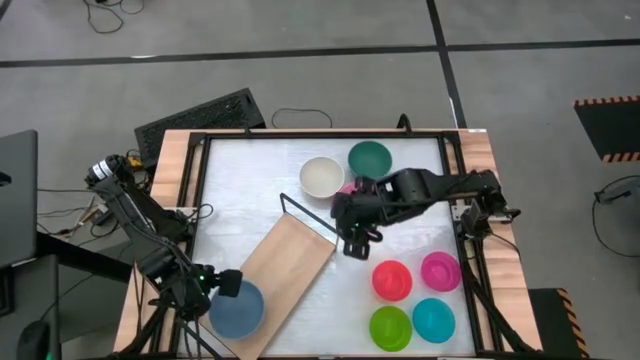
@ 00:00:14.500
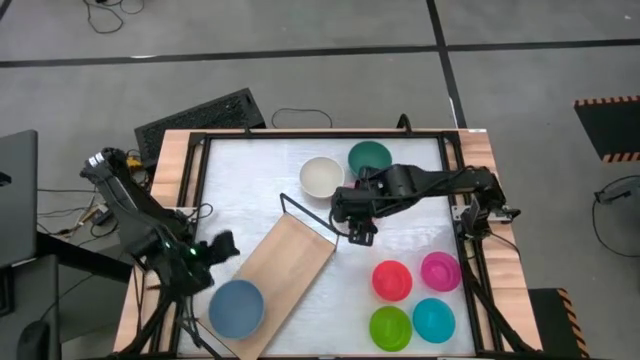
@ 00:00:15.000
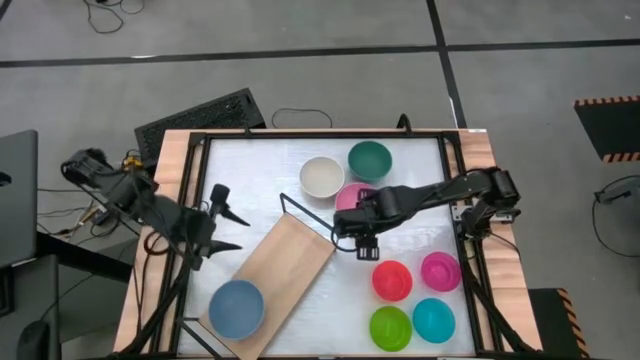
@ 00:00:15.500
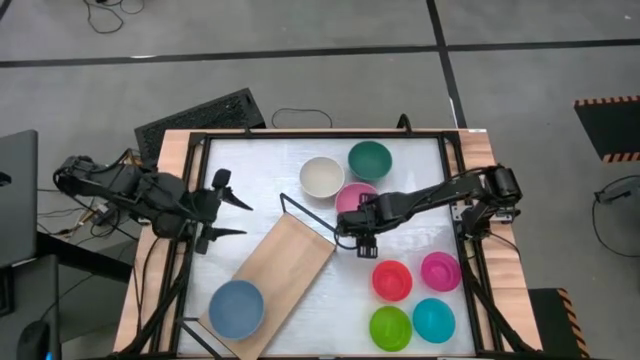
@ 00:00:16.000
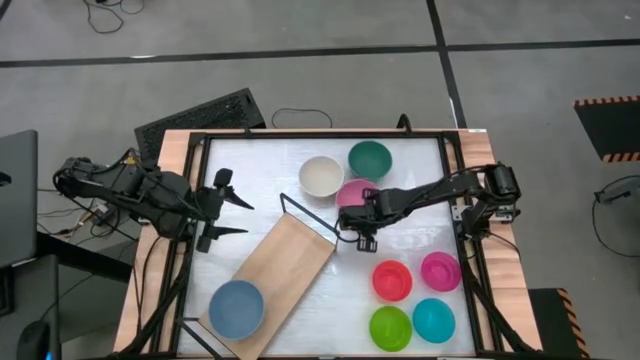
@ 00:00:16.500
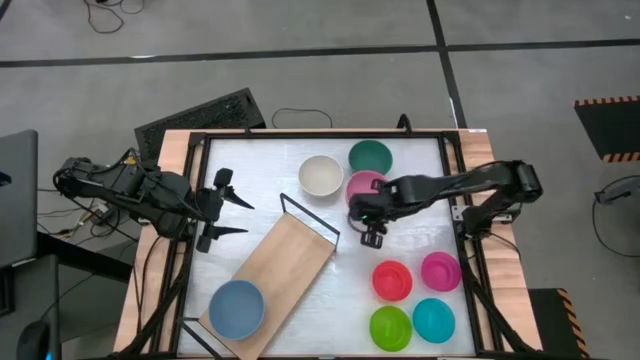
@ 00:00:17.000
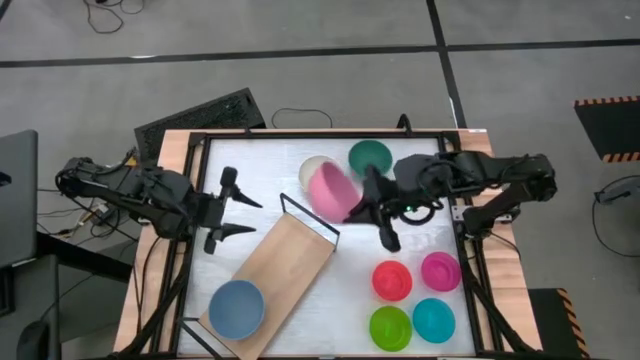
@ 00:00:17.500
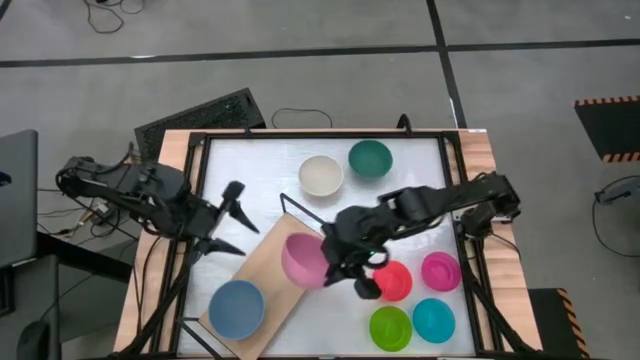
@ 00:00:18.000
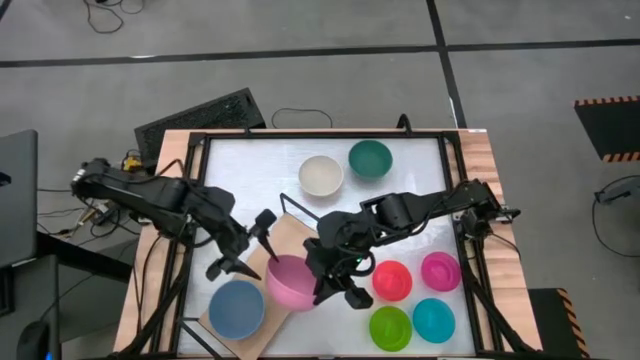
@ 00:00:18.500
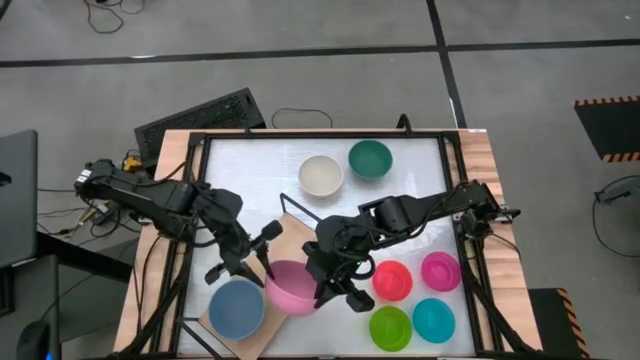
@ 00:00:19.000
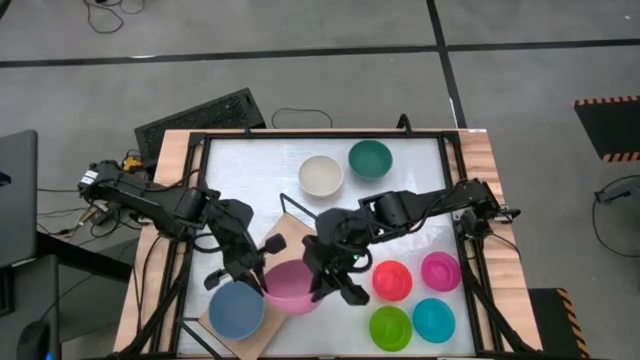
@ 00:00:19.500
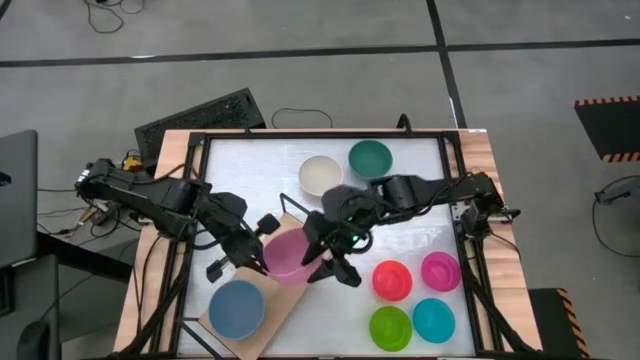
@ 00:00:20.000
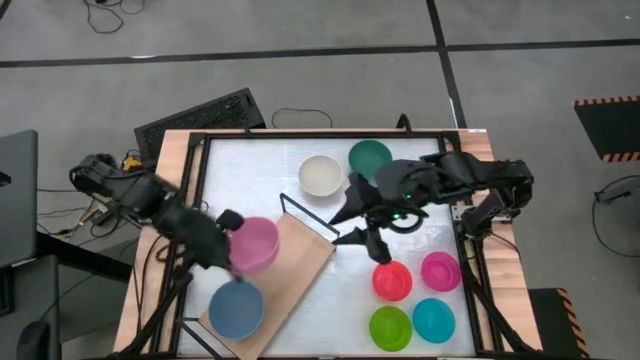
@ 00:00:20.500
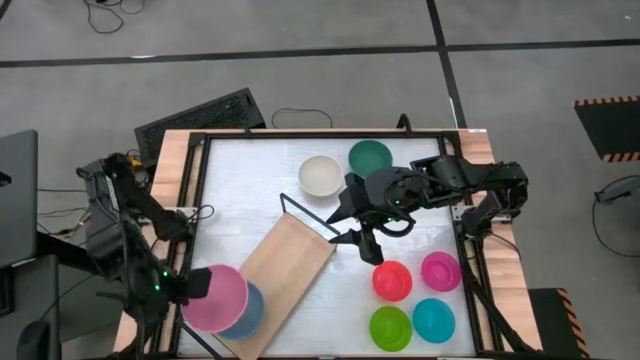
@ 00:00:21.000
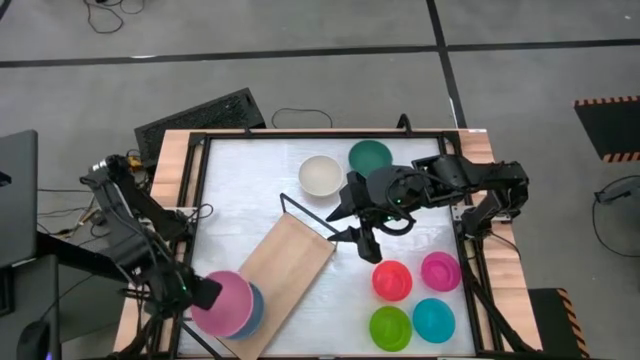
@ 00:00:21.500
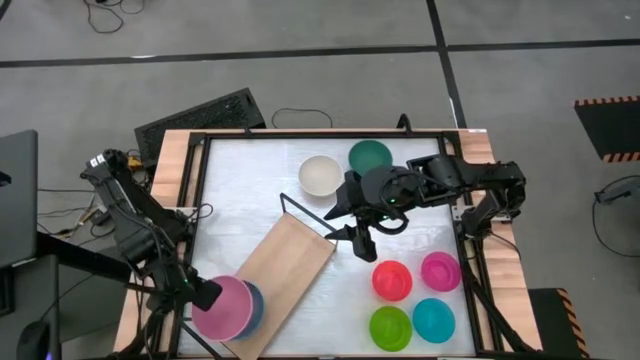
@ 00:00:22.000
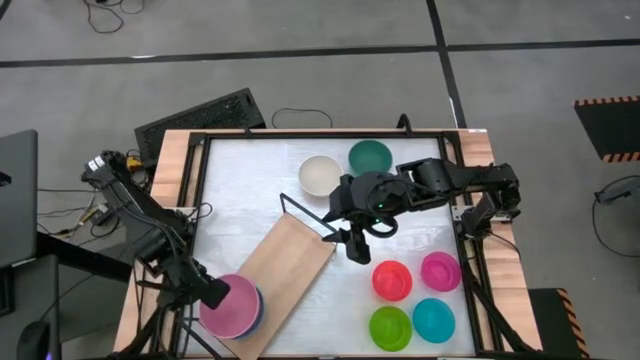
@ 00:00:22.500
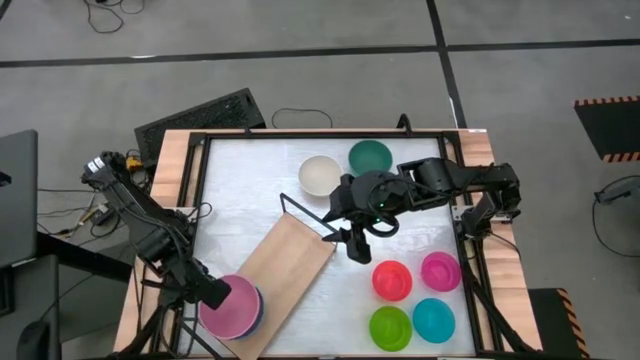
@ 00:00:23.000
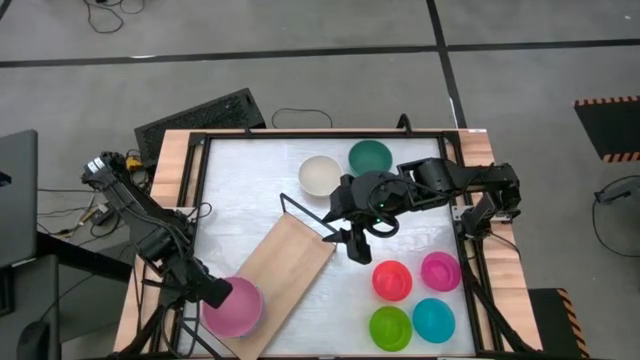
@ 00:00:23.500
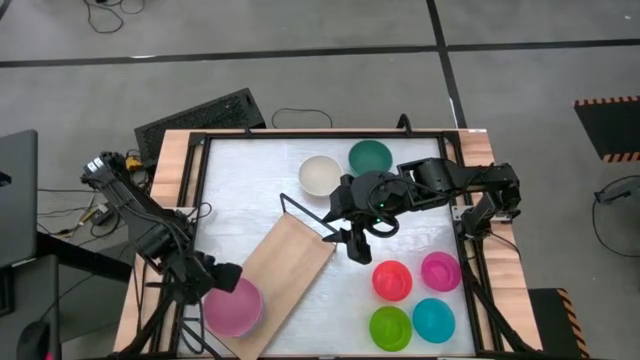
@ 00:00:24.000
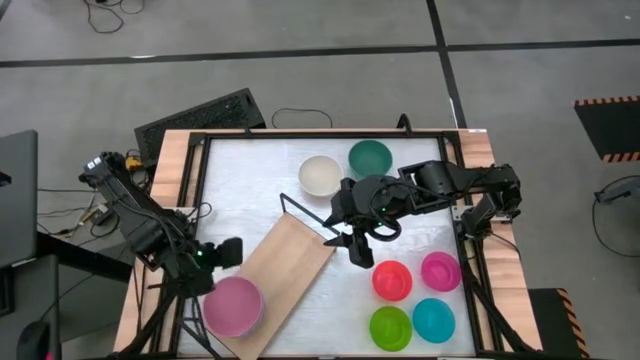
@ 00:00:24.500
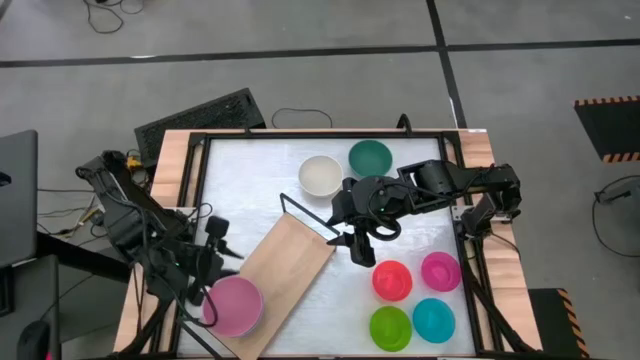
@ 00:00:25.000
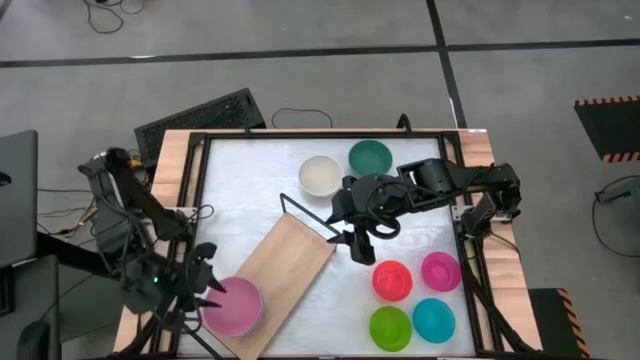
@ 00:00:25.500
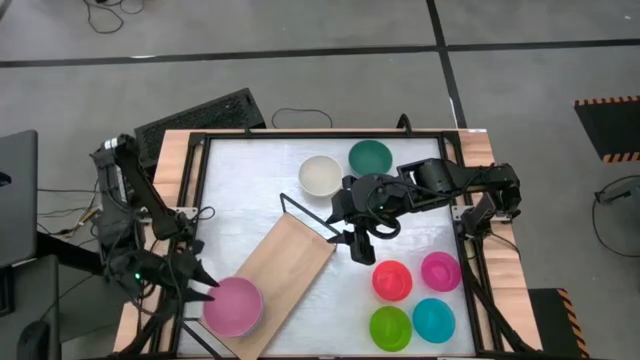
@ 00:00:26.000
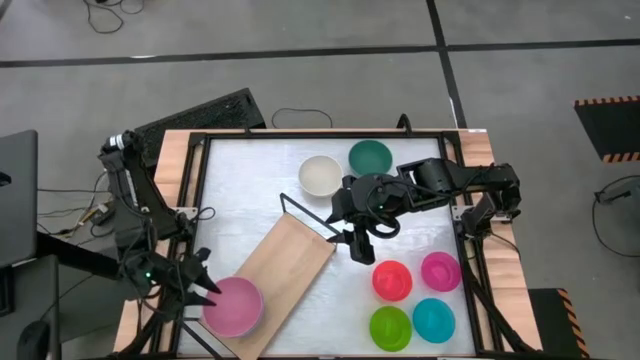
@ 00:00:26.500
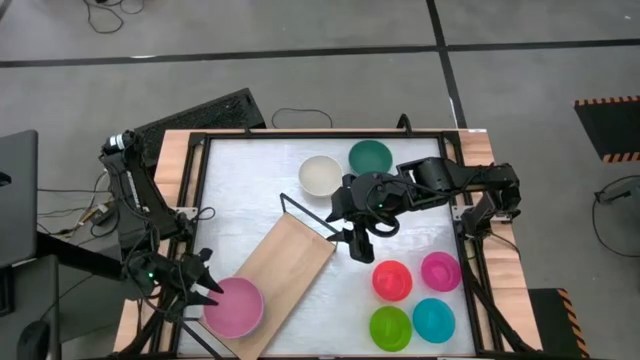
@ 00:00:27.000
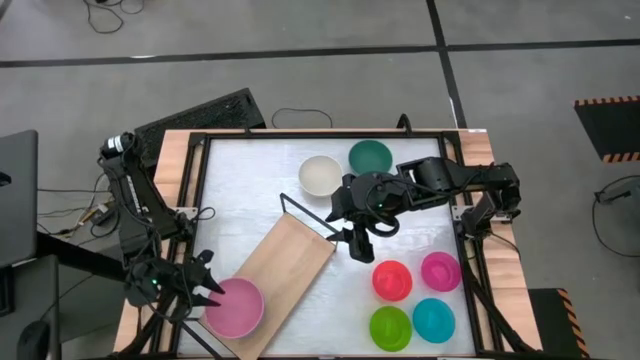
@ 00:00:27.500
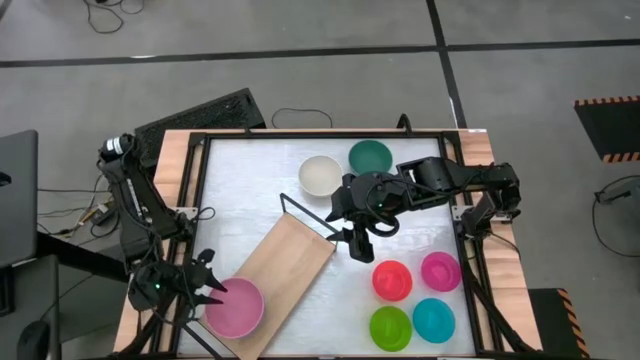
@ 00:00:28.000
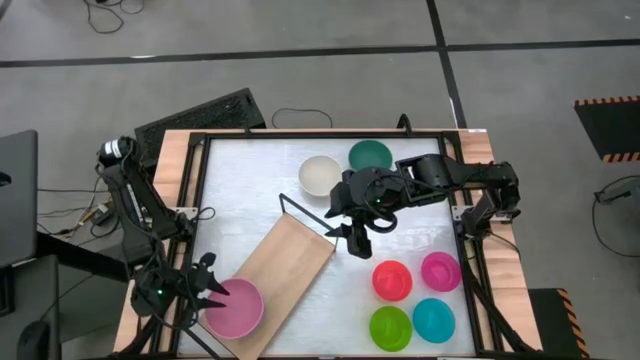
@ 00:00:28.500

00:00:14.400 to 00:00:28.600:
Task: Place and stack bowls onto a shelf
Stack the big pink bowl on the big blue bowl on the shelf

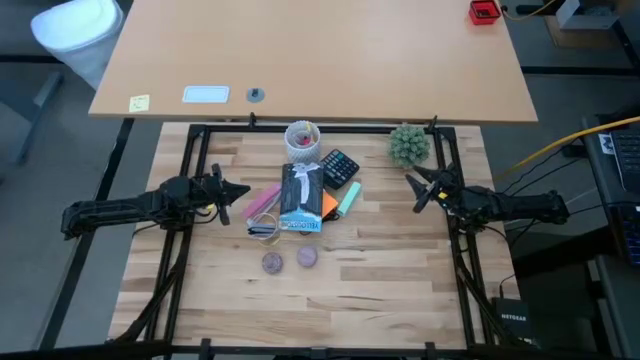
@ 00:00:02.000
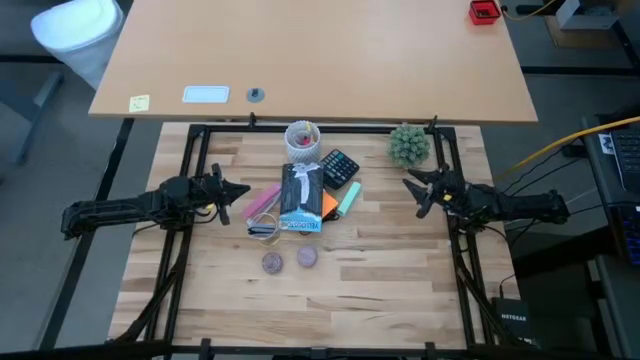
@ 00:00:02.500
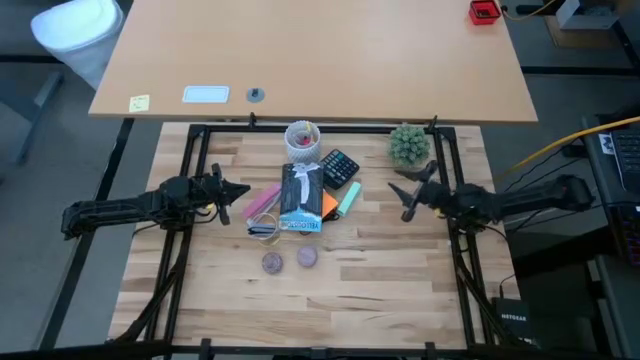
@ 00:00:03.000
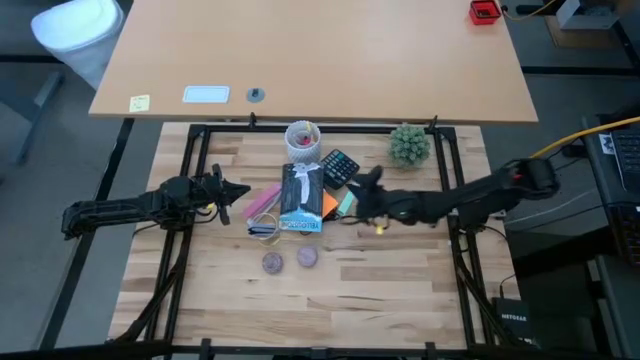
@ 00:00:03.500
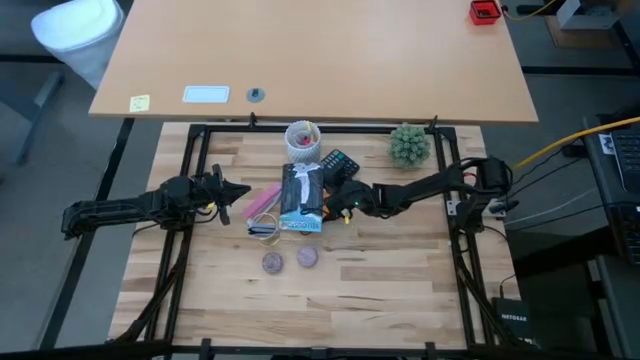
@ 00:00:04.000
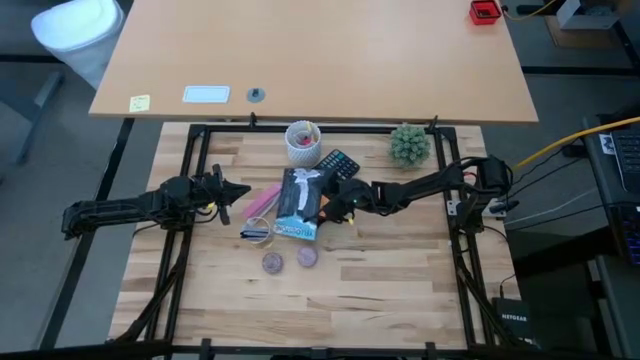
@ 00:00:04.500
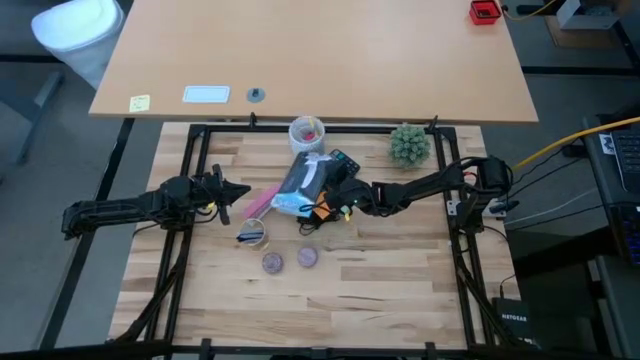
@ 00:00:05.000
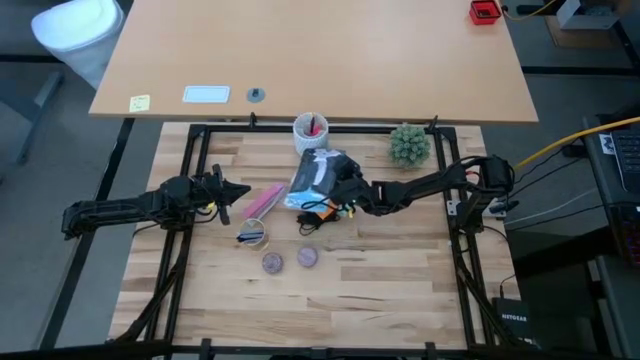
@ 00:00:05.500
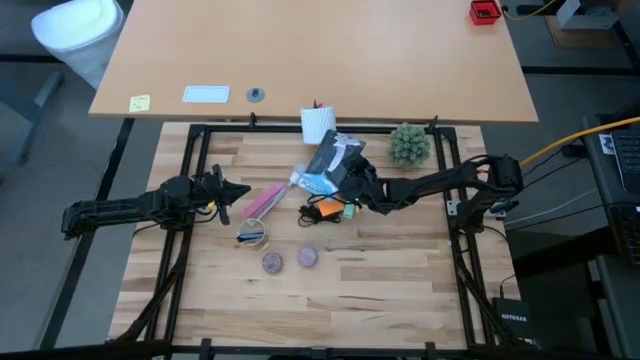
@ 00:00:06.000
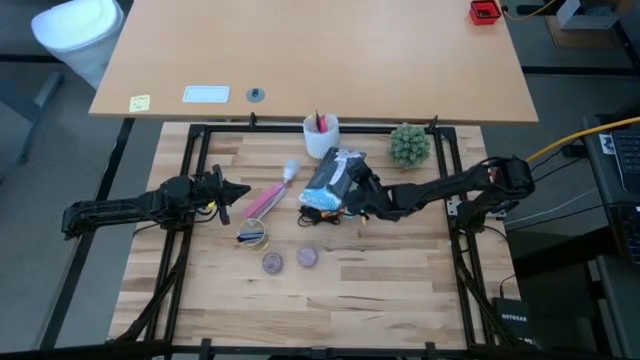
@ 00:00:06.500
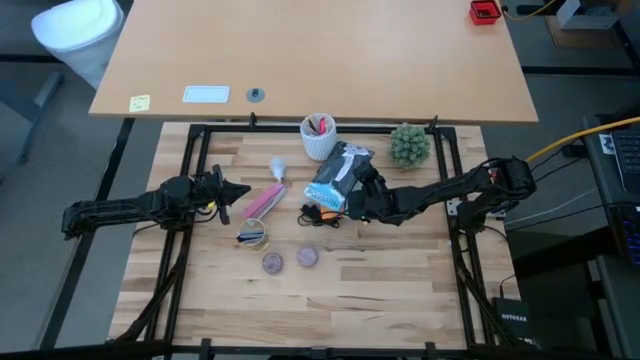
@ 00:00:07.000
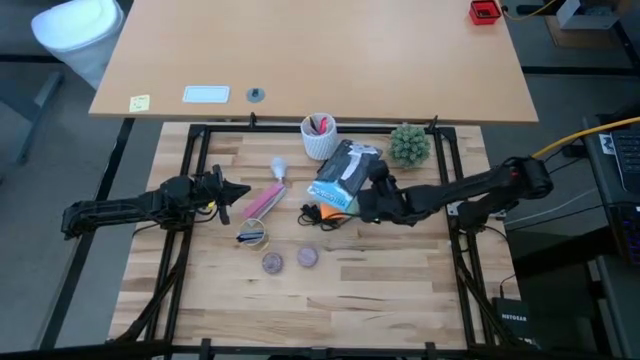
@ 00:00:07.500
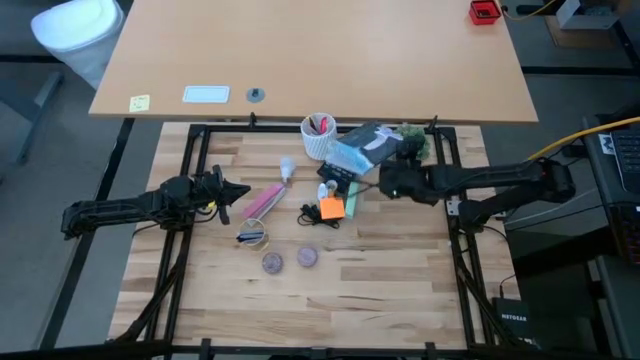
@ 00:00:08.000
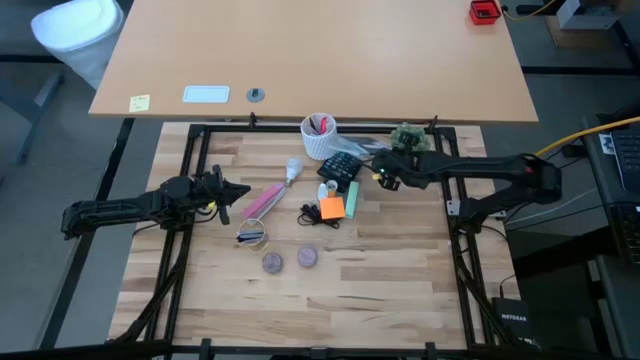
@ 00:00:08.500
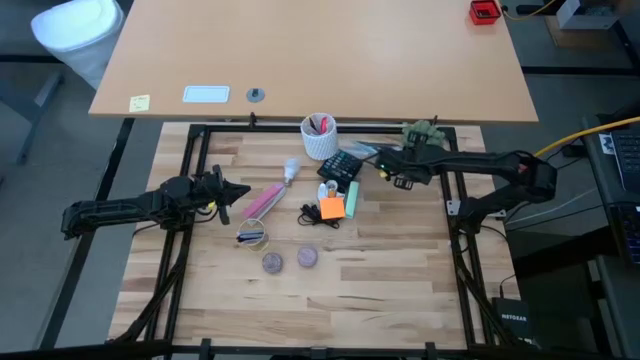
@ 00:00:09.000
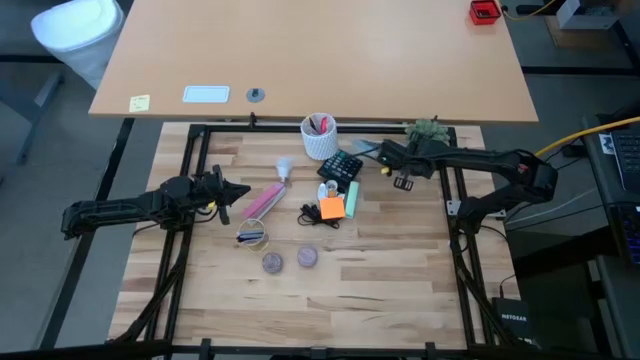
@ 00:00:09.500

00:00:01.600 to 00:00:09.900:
Task: Screw lightbulb
Move the black book to the top right of the table
